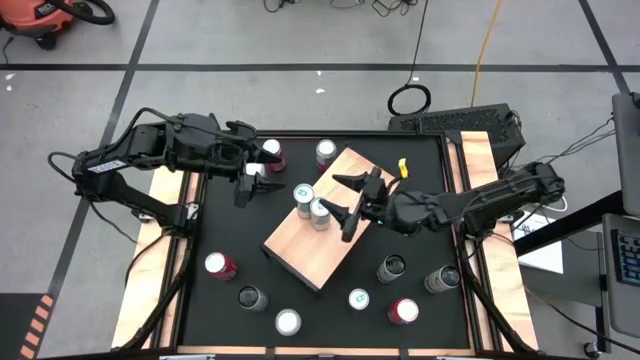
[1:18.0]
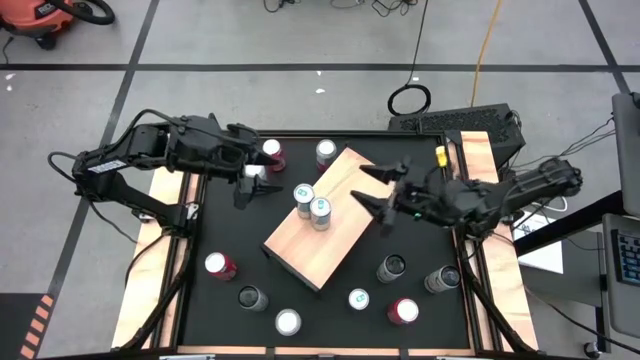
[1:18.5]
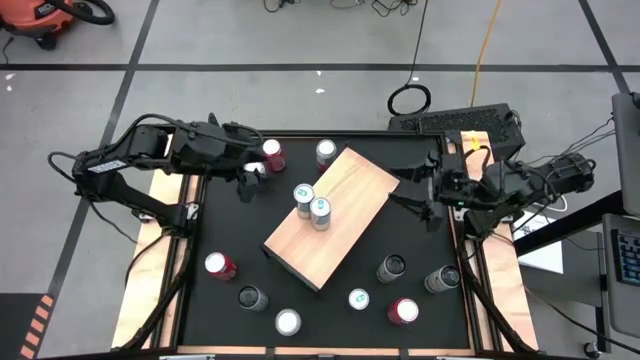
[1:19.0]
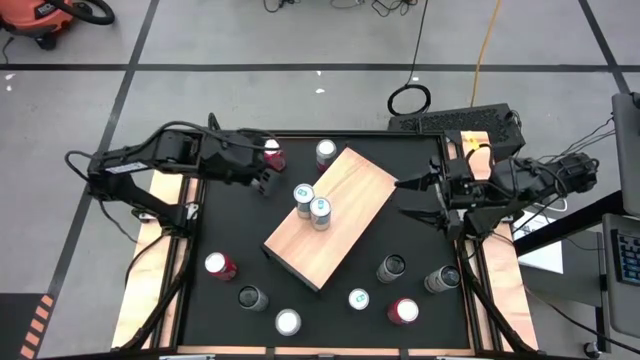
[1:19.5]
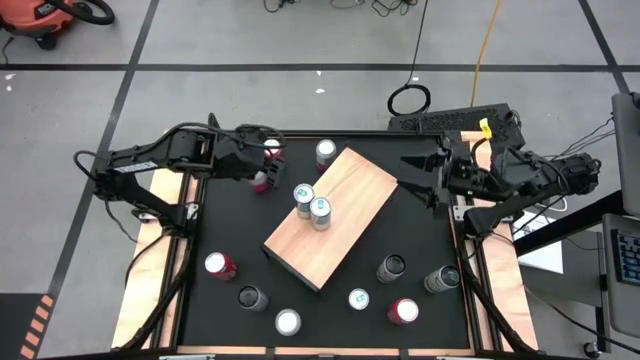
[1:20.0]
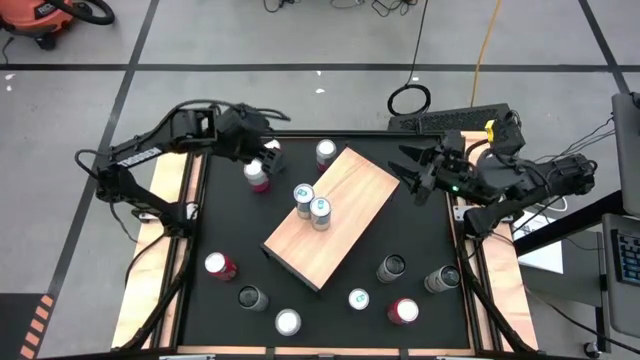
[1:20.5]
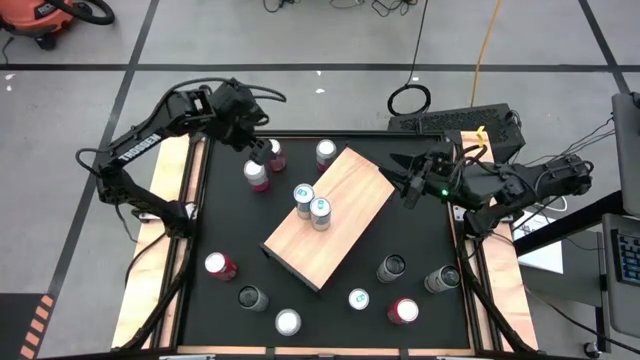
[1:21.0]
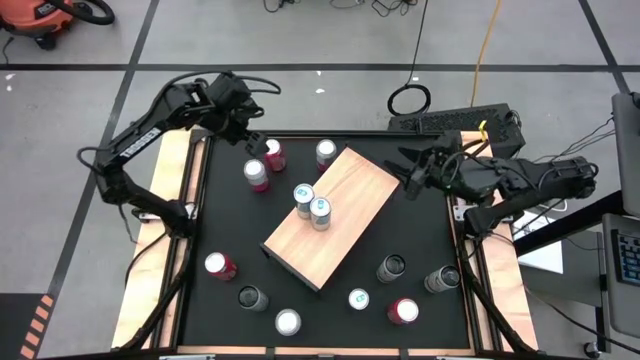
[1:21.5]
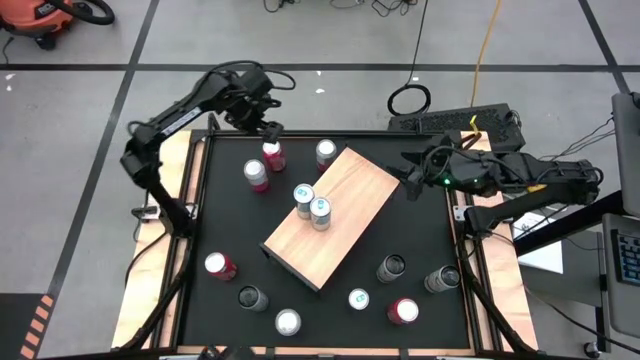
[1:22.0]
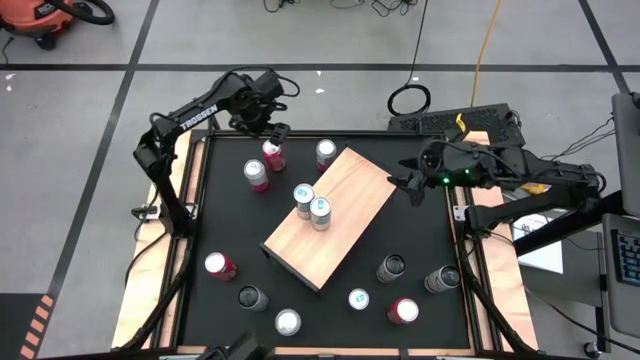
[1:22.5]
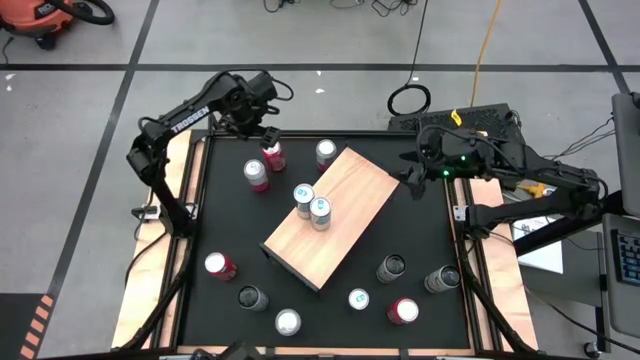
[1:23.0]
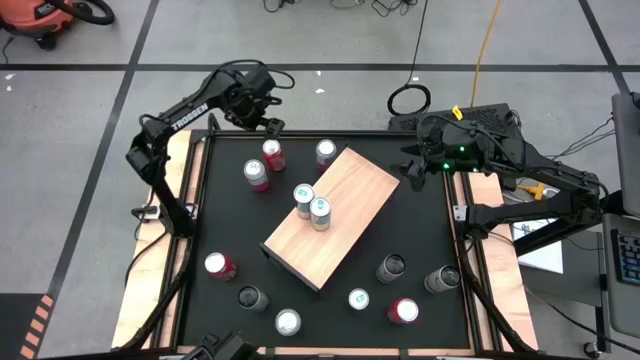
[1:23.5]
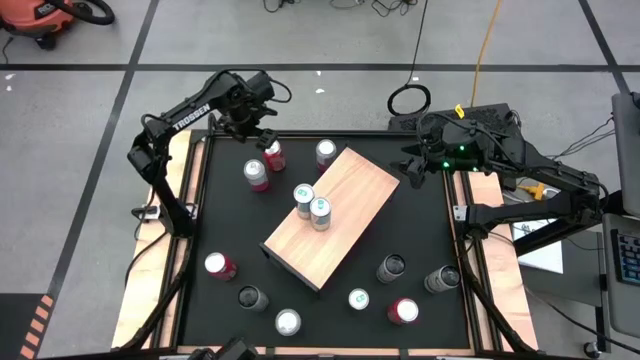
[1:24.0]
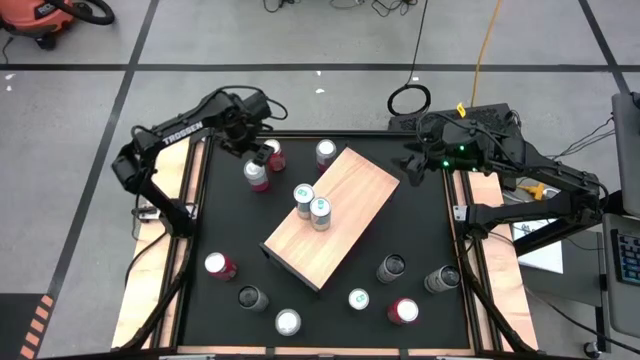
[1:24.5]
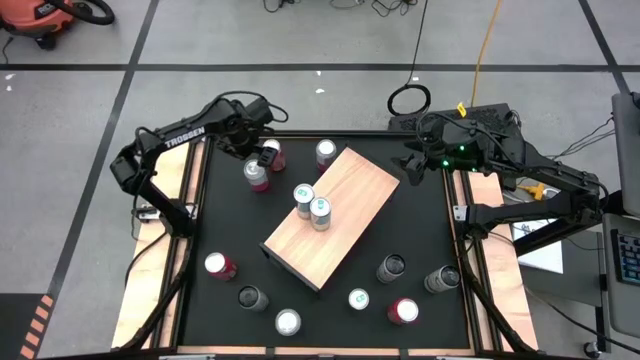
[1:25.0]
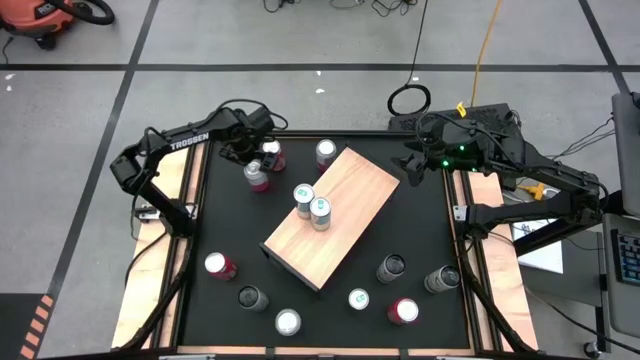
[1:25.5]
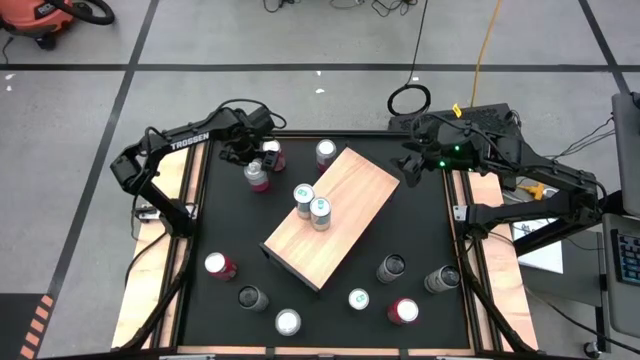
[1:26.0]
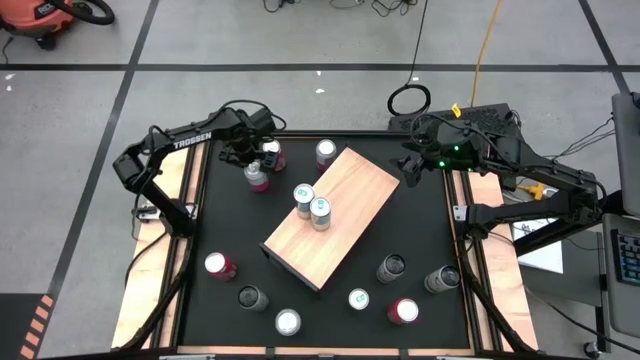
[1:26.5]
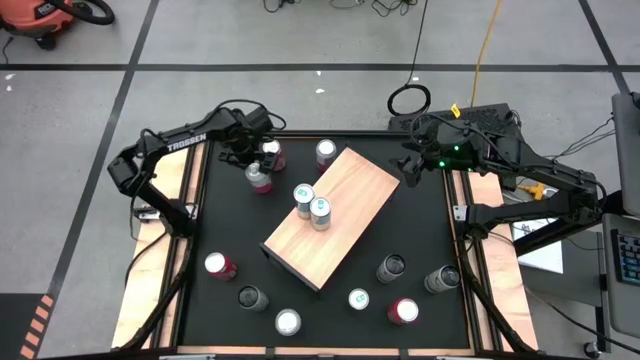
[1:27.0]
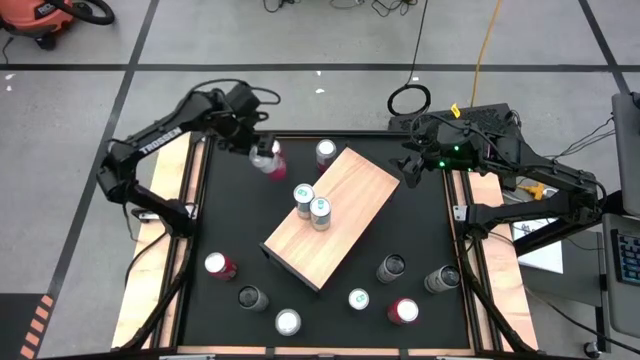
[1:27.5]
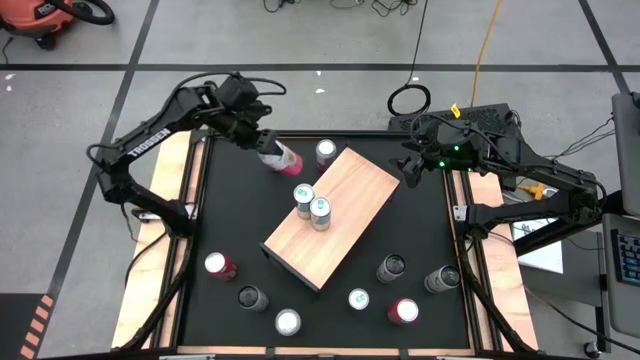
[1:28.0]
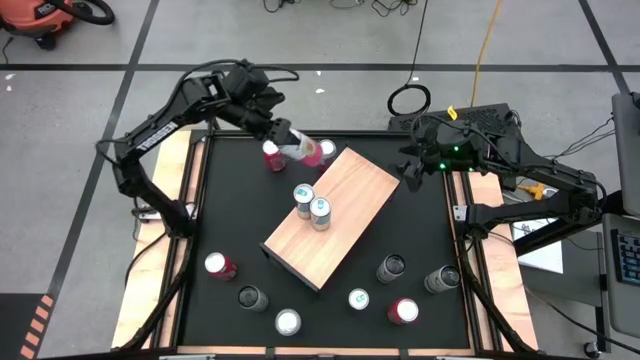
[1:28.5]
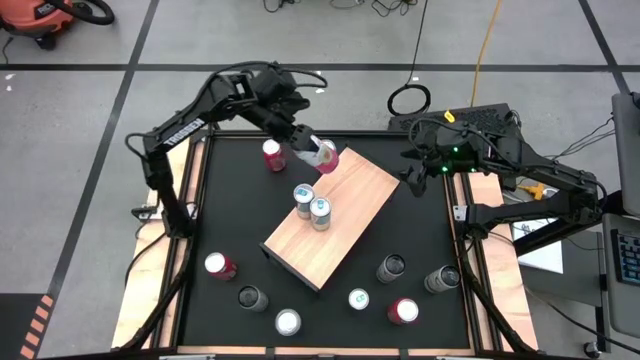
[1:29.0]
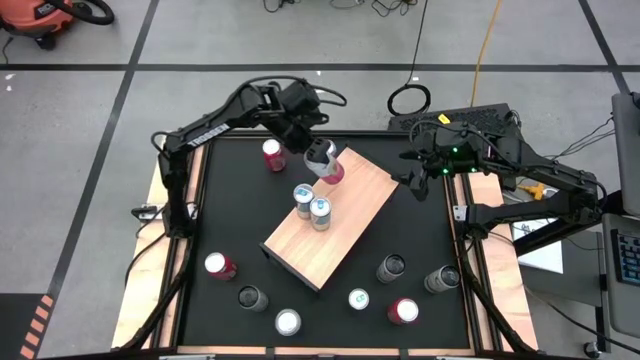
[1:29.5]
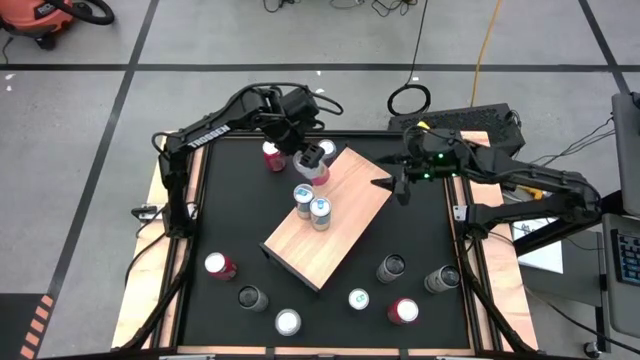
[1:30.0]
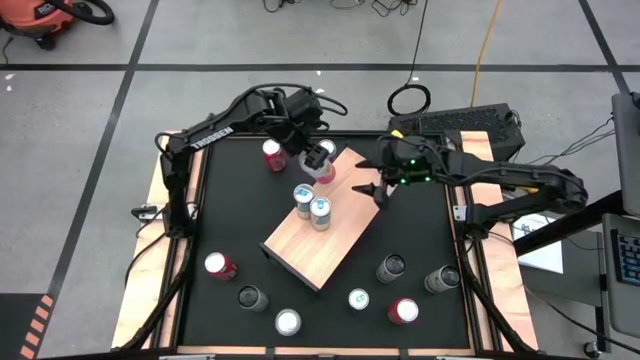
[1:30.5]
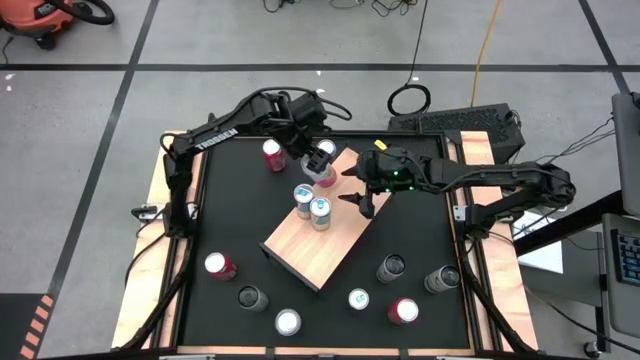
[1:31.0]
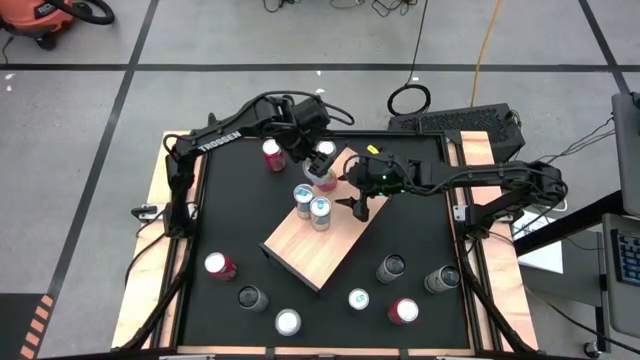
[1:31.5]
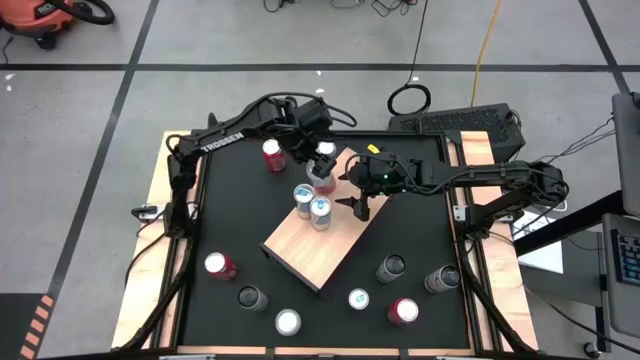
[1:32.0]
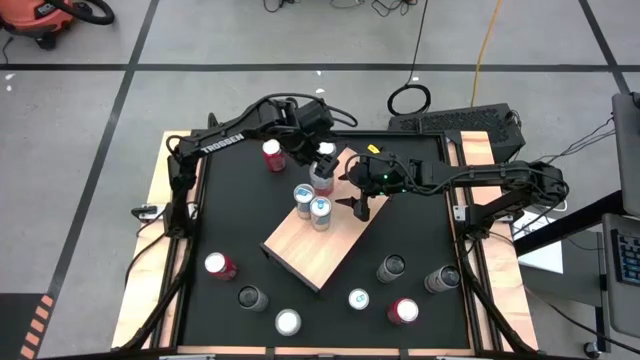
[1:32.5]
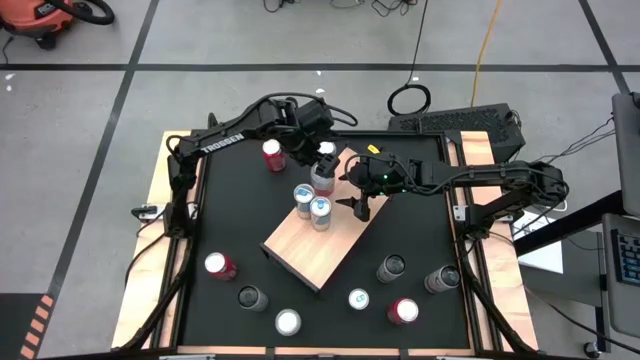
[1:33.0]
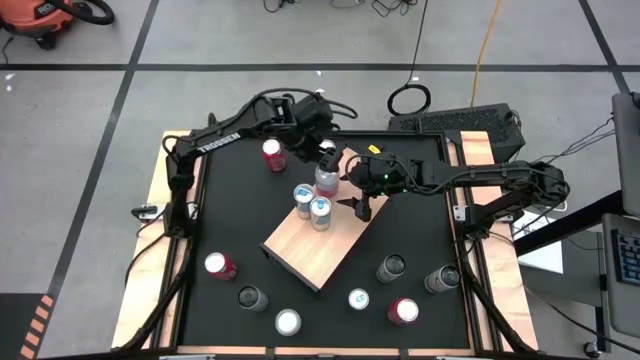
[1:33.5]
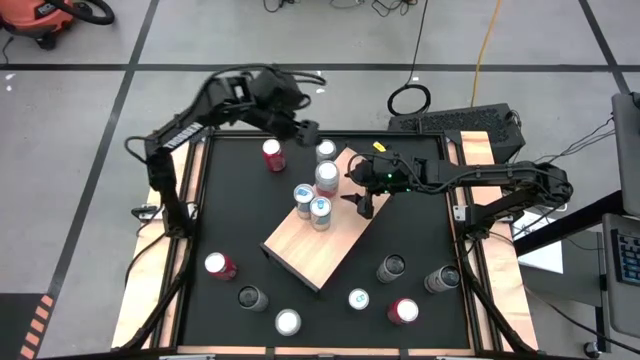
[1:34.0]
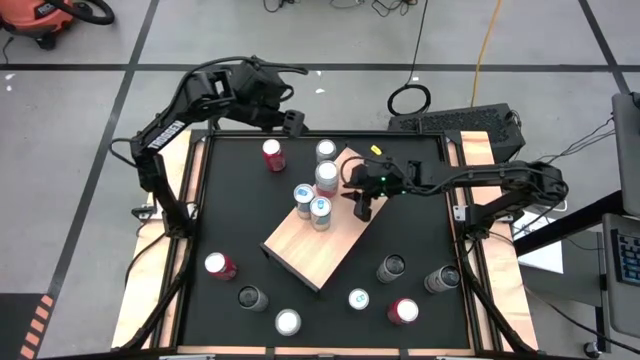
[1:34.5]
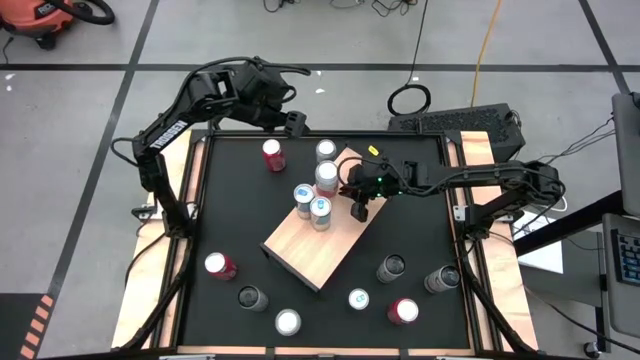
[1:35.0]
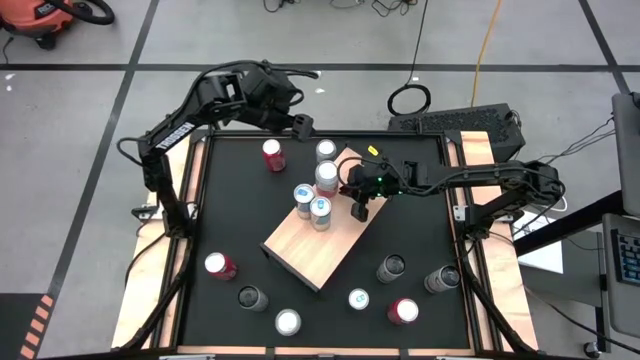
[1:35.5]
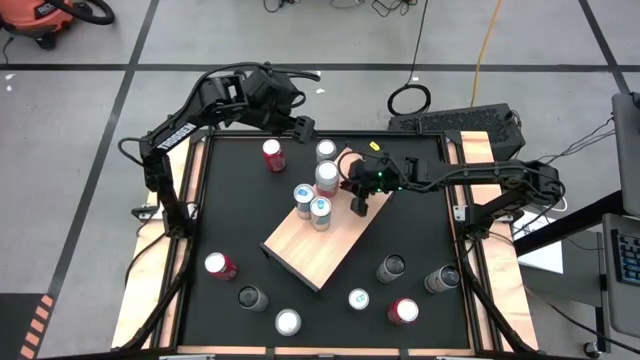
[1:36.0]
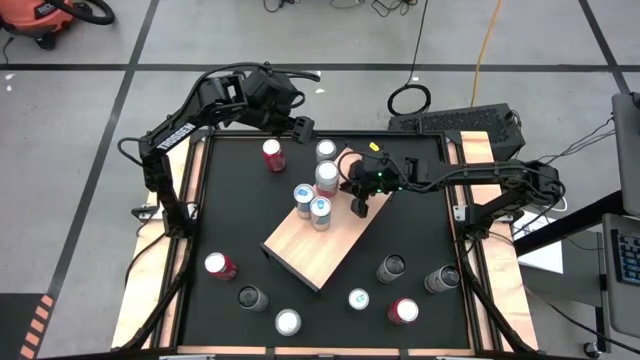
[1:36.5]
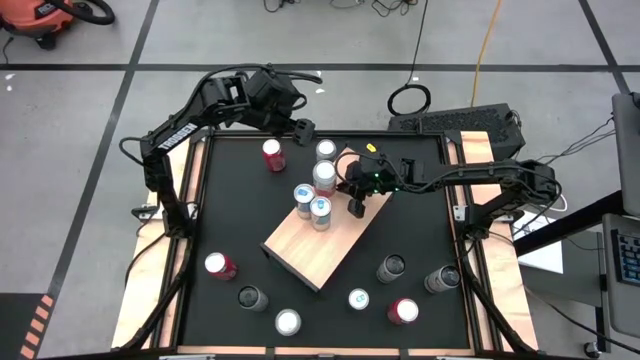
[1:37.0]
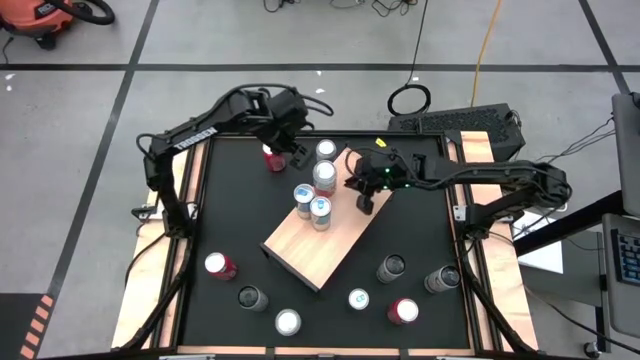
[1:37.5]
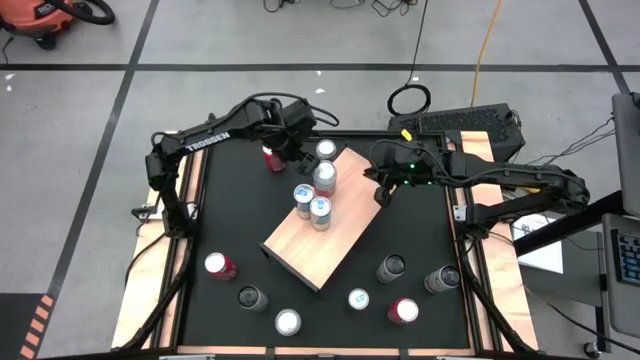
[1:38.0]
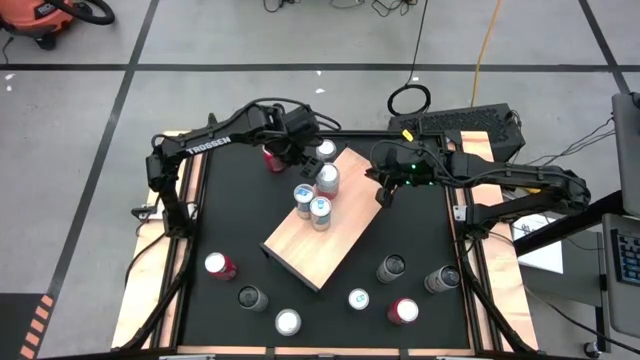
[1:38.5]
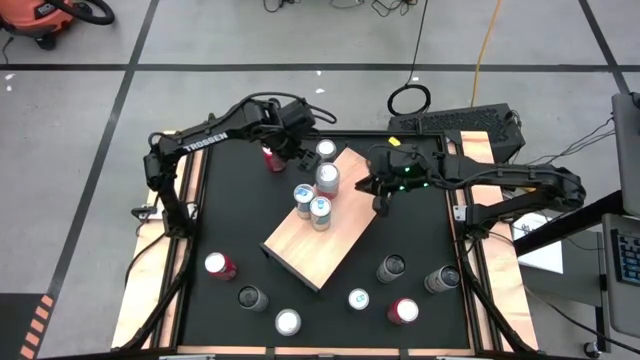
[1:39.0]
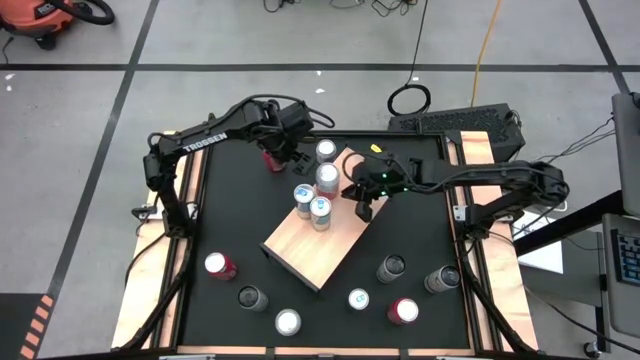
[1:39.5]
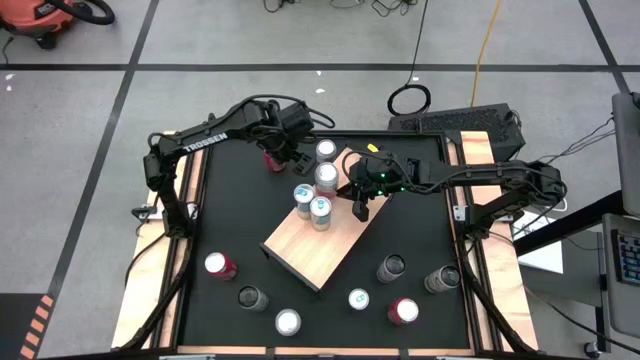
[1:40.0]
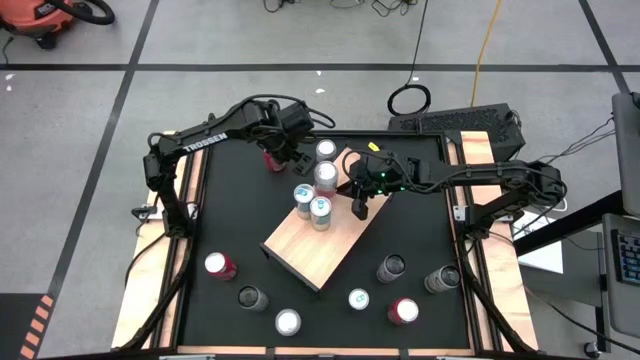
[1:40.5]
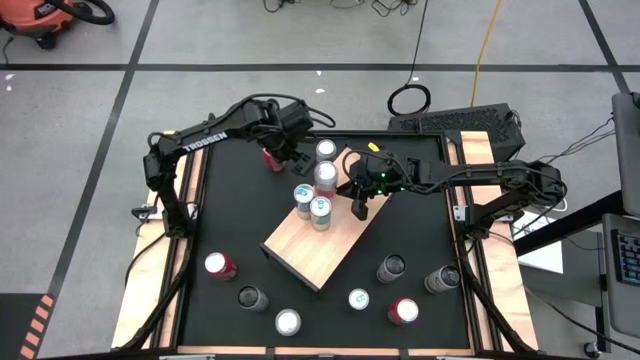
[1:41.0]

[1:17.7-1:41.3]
Task: Place canned beverage on shelf
Put the top left pink-white soda can on the shelf
